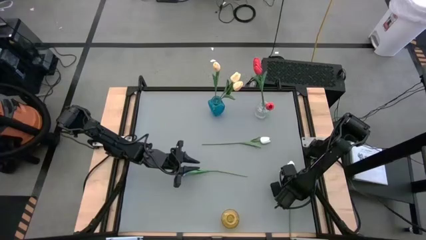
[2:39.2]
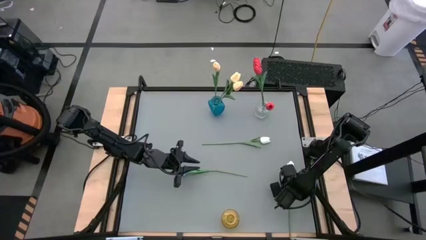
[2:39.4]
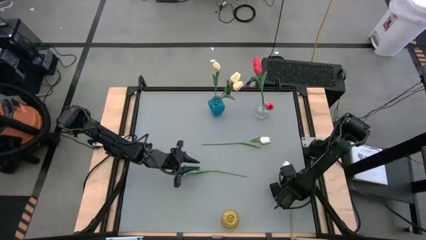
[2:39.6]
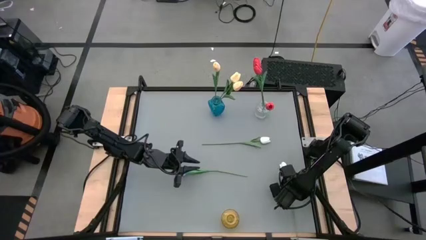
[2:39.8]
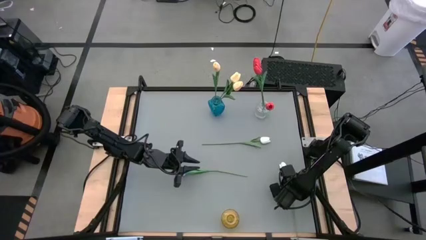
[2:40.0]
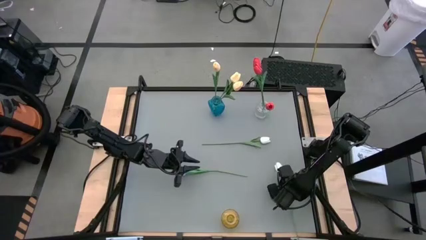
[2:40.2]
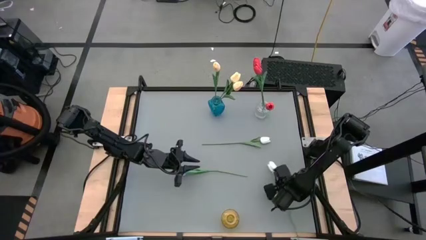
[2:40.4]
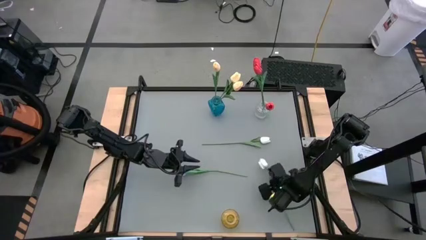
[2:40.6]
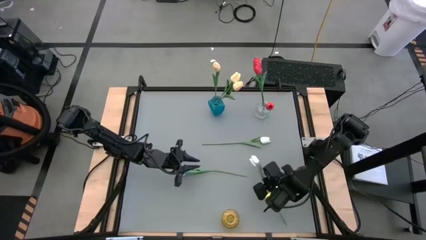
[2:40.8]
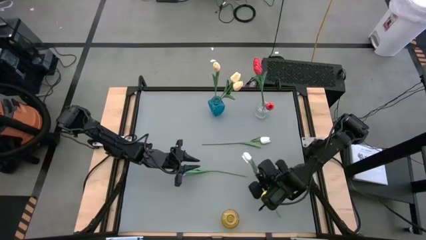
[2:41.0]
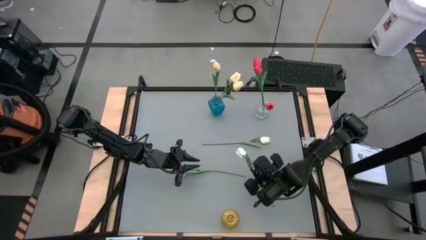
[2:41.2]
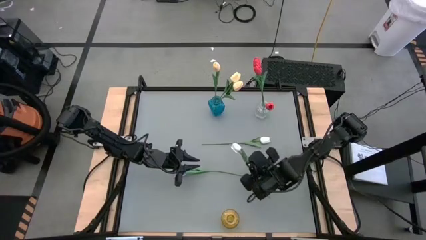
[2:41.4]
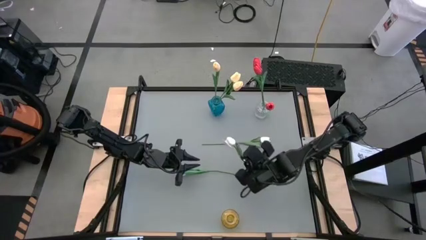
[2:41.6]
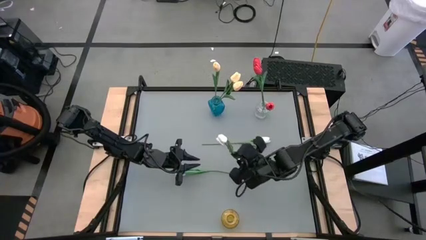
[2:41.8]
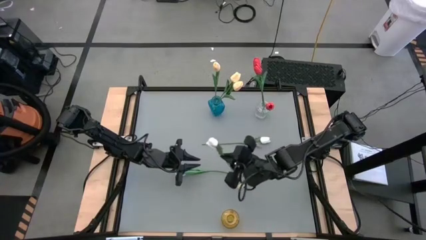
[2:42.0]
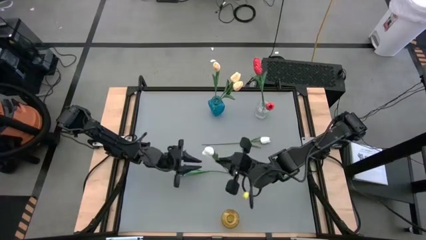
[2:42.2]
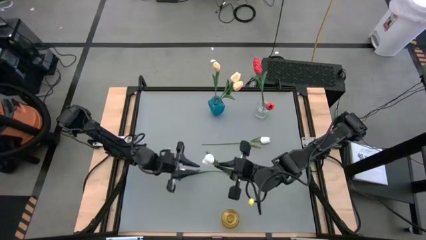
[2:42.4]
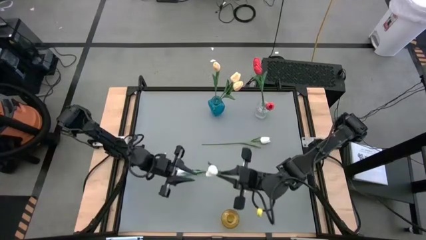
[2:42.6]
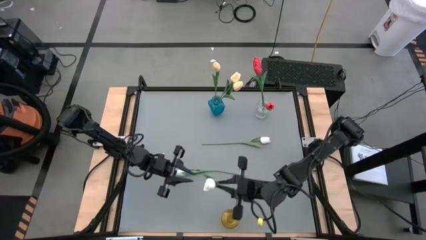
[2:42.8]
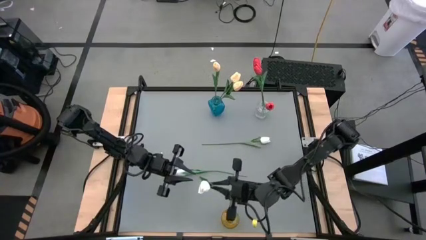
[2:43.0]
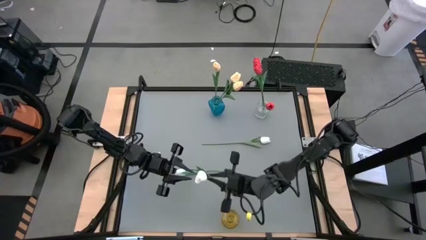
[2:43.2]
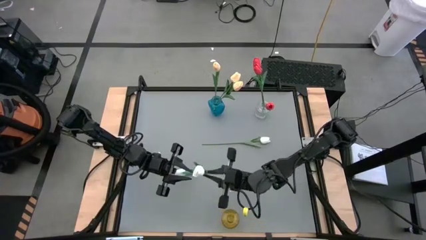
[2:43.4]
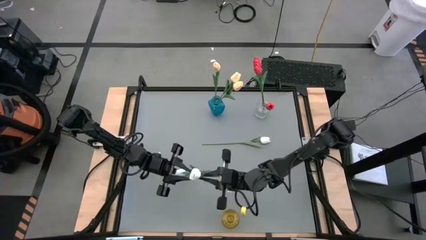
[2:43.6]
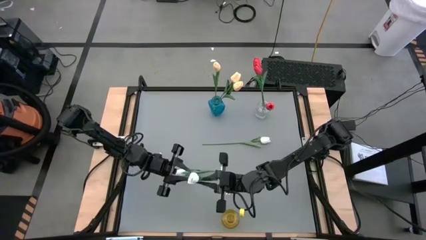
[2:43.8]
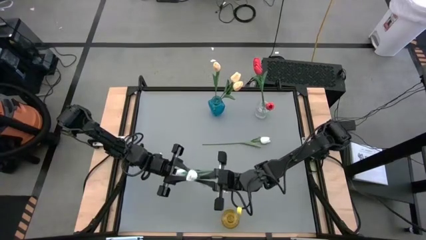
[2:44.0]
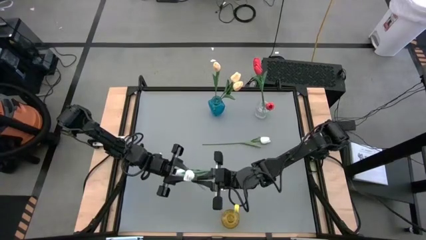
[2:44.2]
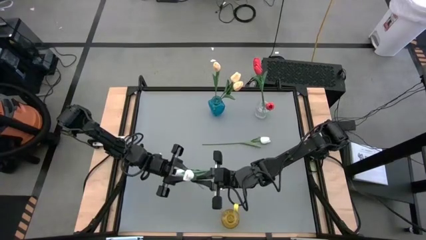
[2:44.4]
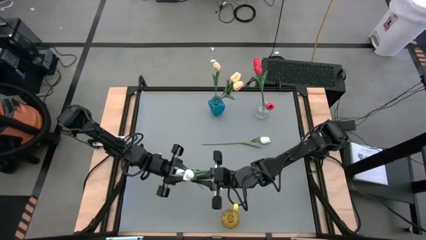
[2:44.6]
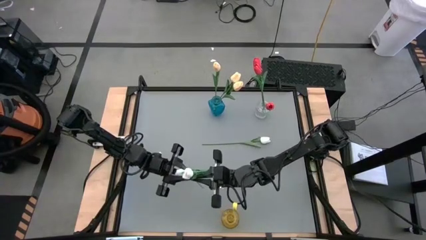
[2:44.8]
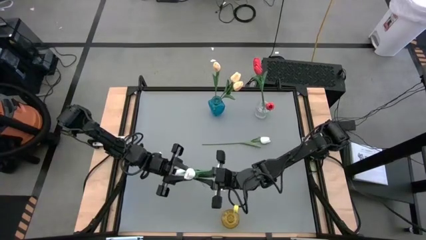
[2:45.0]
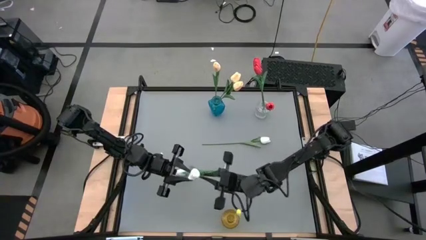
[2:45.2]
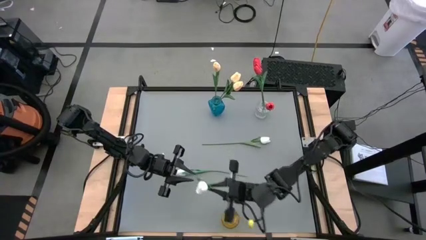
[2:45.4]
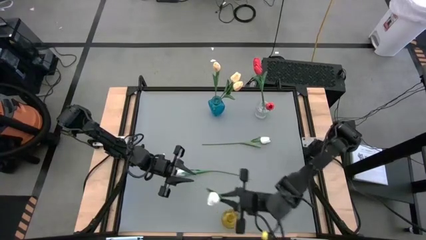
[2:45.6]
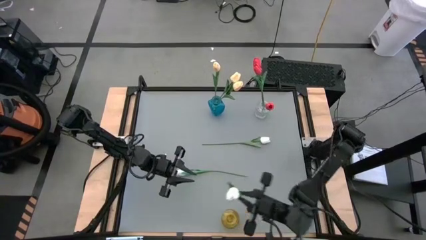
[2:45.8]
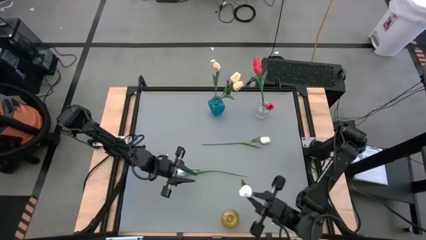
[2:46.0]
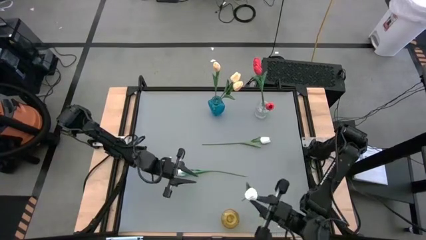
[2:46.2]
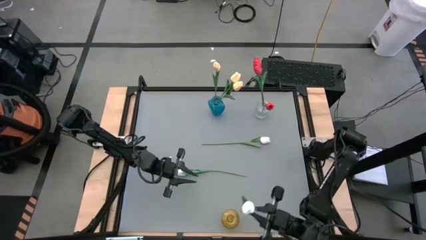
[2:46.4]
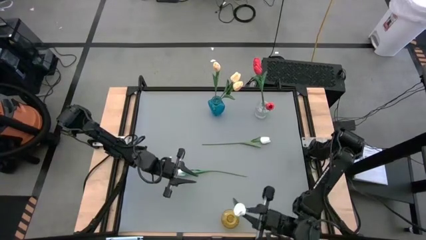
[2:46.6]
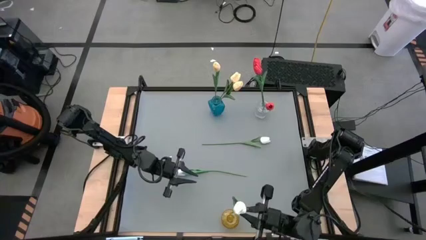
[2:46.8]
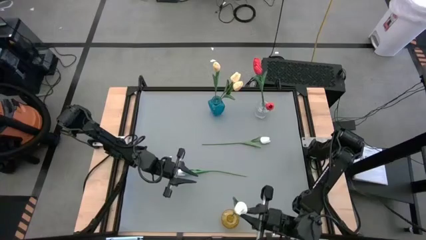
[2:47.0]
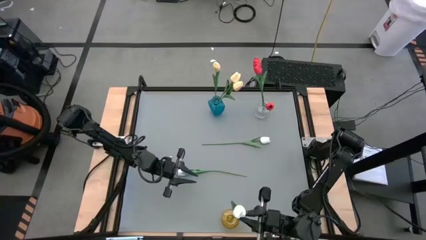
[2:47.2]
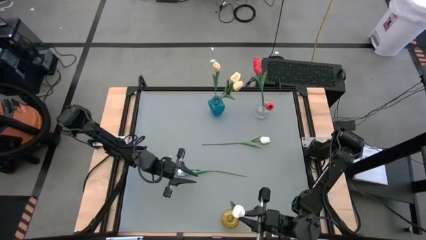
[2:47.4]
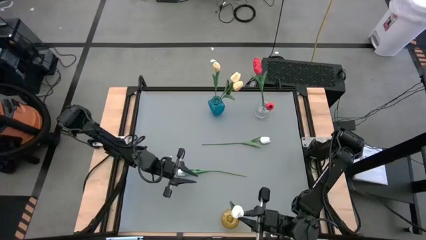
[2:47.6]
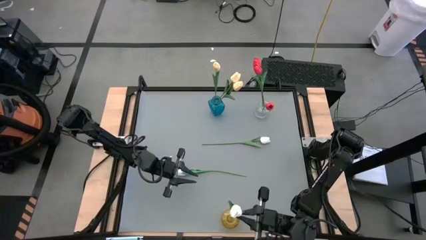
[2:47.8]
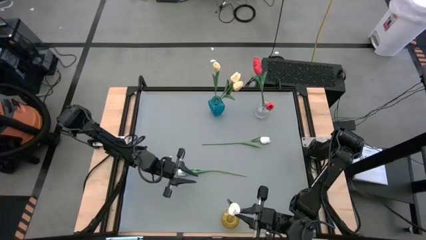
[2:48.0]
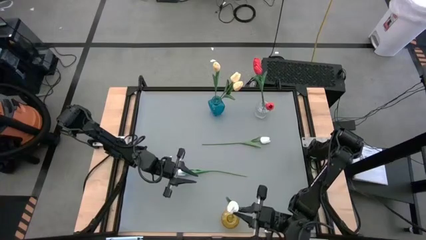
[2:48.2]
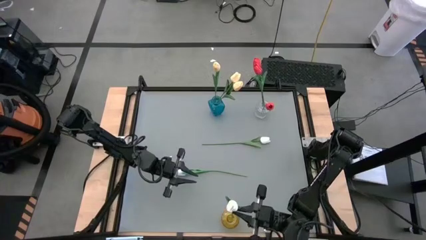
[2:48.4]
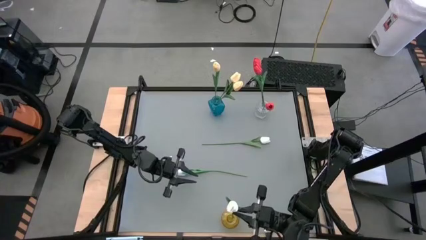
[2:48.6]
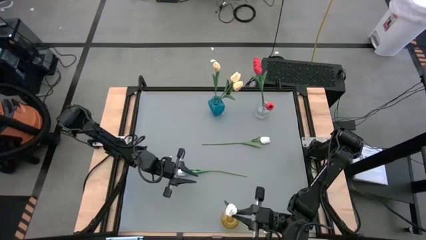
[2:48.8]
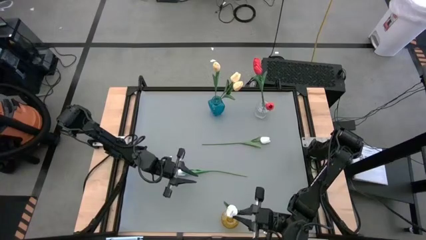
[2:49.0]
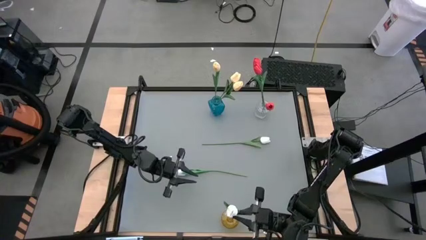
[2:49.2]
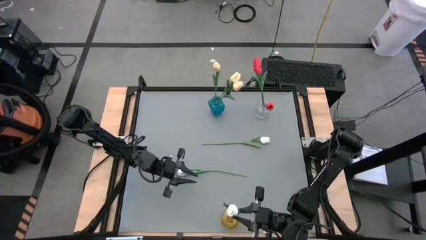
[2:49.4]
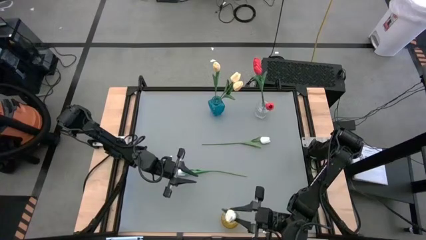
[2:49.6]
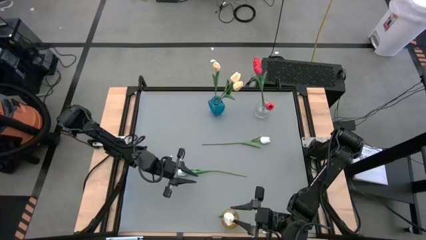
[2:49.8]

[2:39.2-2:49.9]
Task: Sort flowers into vase by color
Put the bottom right white flower into the yellow vase

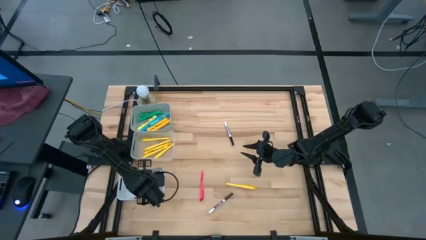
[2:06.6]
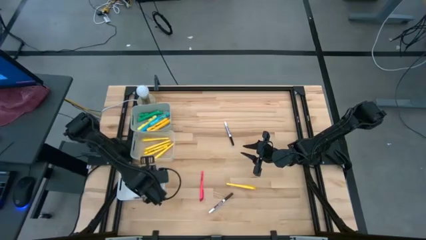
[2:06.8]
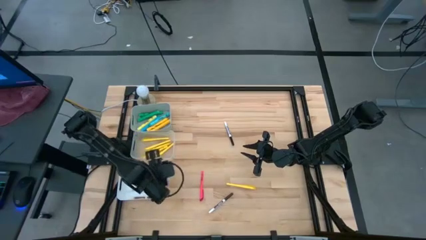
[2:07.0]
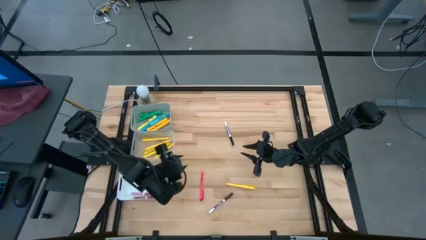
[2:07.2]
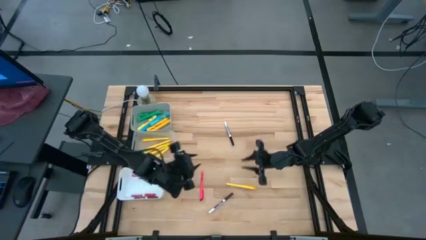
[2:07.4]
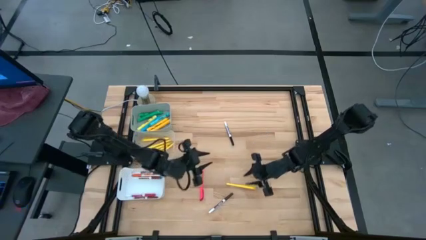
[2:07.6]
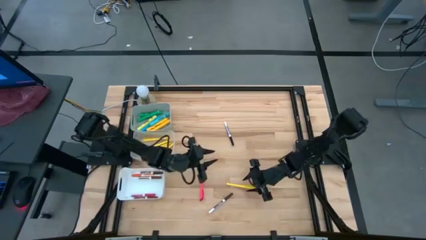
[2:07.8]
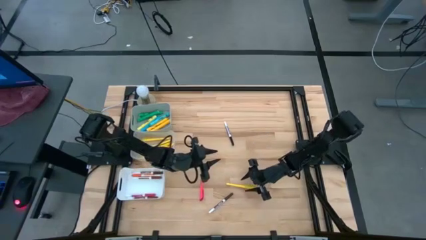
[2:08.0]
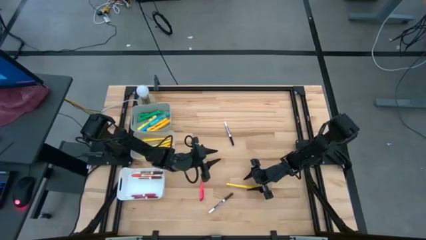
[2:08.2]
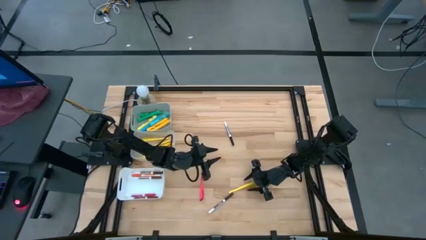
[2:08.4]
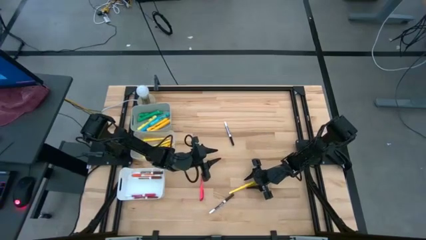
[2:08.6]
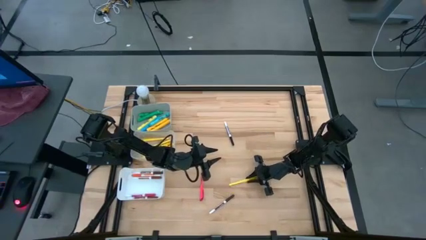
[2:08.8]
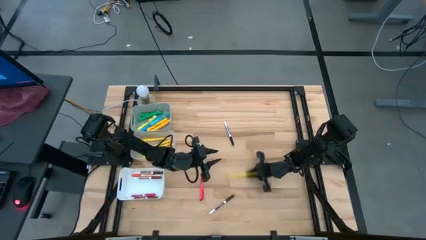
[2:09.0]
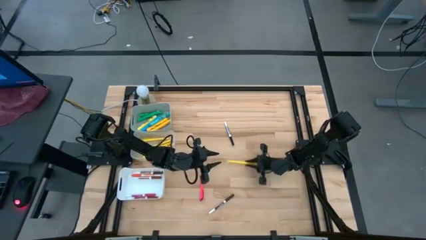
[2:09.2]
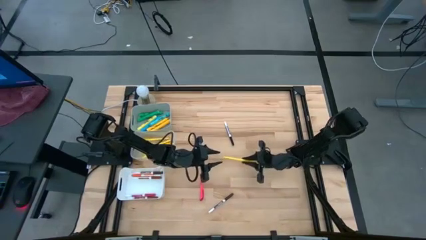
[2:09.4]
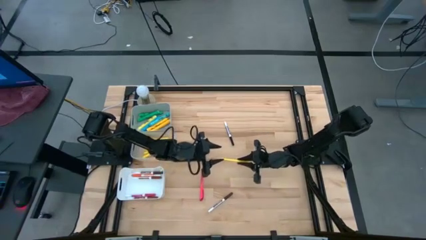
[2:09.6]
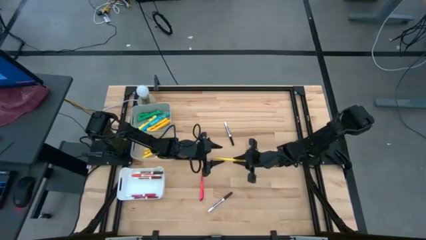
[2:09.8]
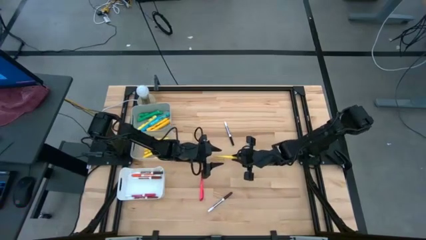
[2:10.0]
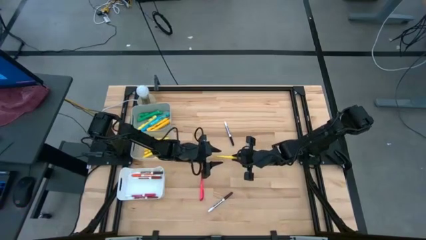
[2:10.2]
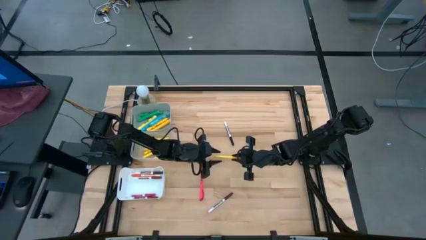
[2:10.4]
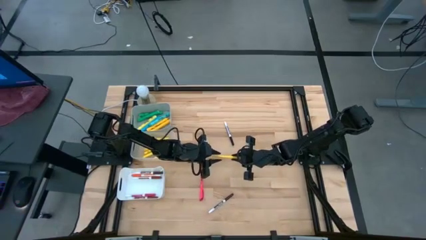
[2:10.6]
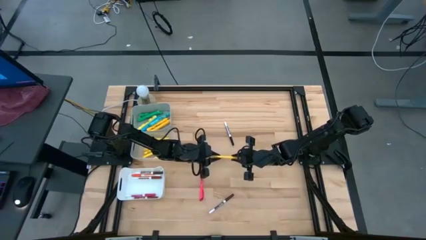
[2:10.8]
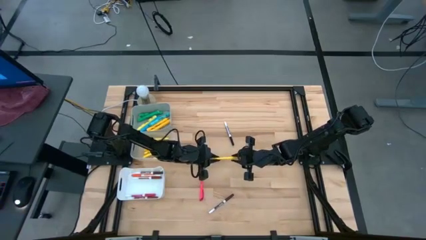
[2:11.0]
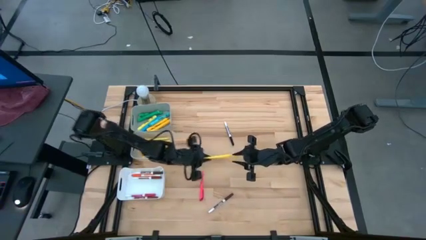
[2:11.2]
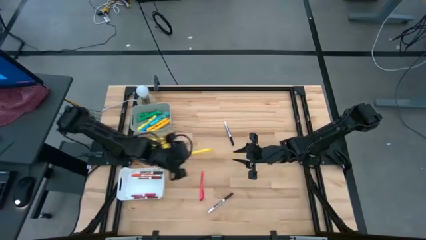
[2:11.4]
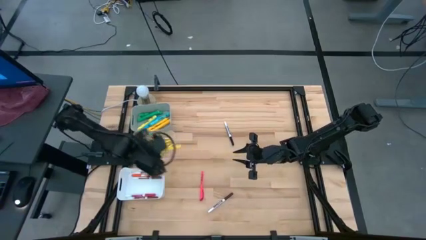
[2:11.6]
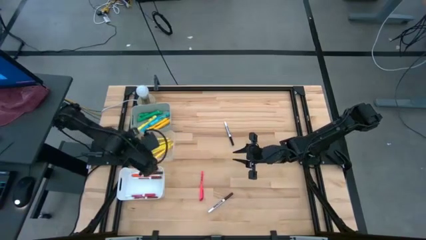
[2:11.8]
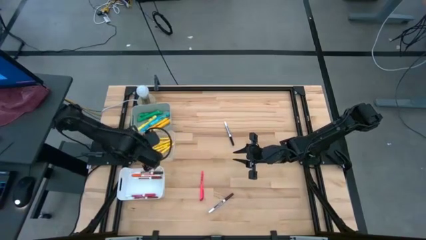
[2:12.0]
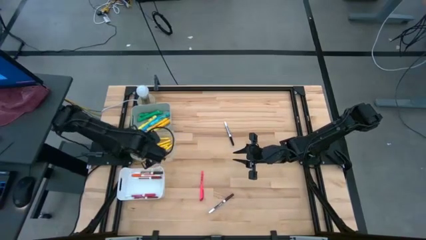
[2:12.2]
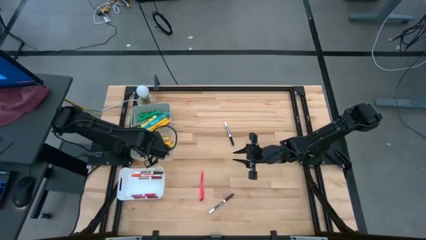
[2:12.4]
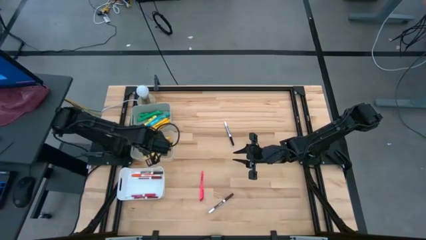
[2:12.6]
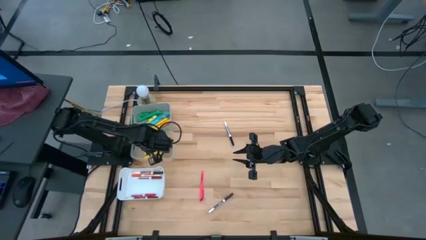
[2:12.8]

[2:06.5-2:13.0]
Task: Pick & Place Markers
Put the yellow pen into the transparent bin
